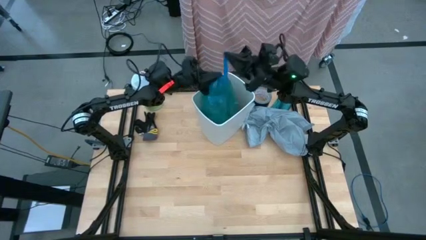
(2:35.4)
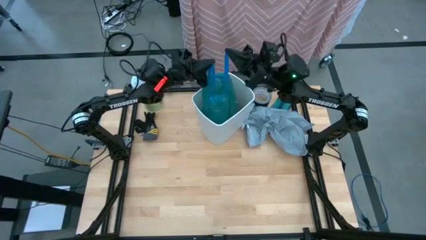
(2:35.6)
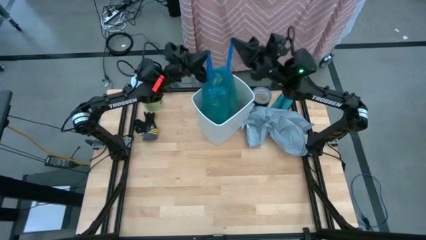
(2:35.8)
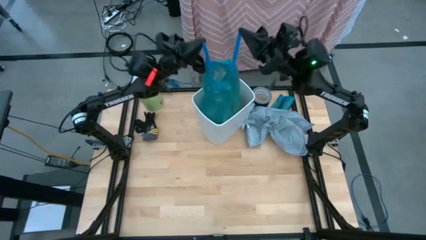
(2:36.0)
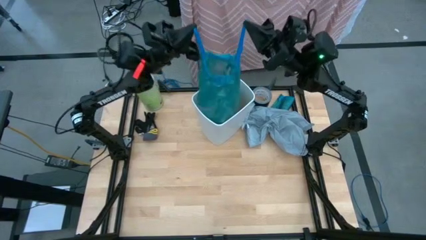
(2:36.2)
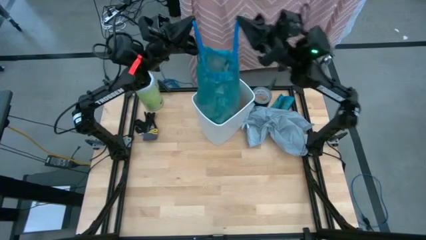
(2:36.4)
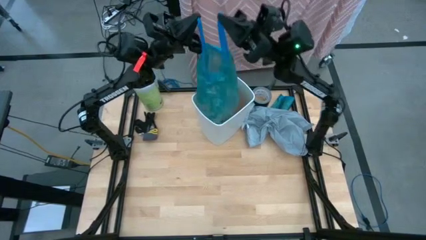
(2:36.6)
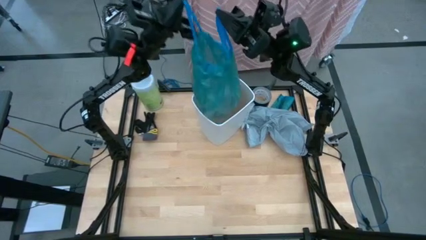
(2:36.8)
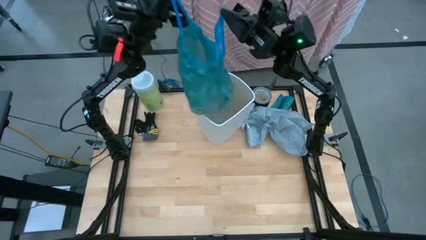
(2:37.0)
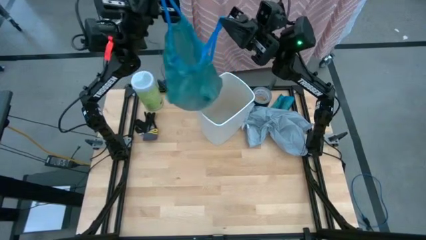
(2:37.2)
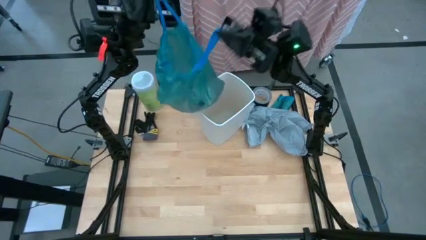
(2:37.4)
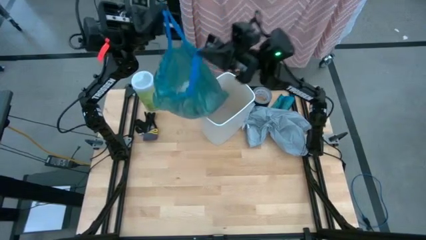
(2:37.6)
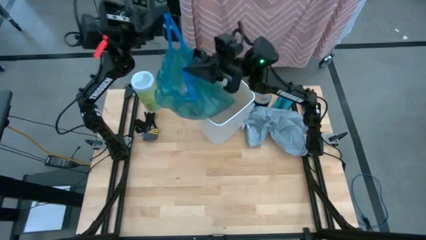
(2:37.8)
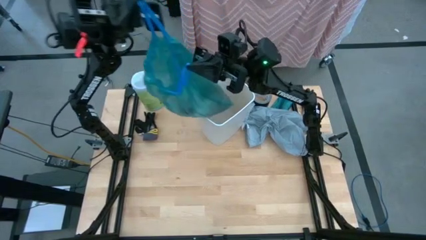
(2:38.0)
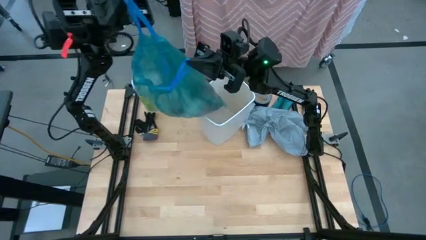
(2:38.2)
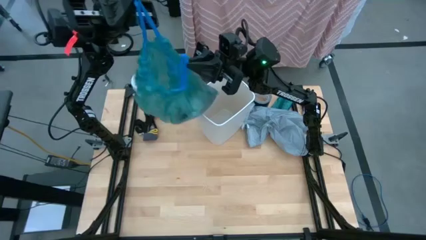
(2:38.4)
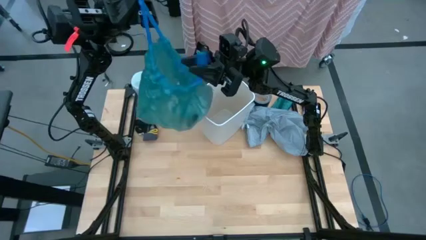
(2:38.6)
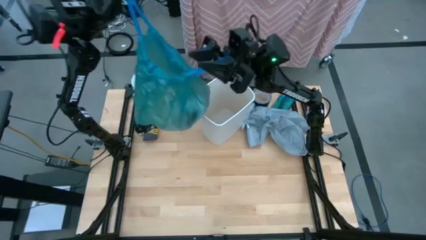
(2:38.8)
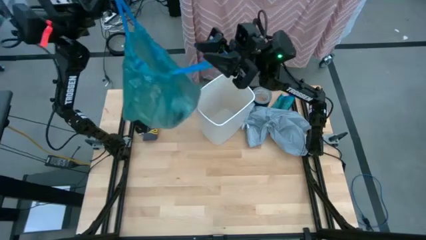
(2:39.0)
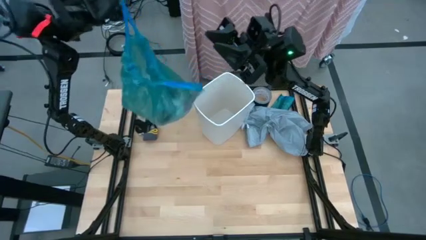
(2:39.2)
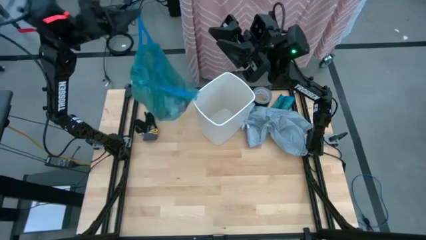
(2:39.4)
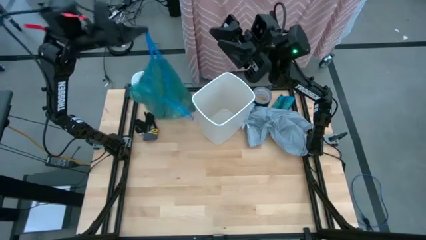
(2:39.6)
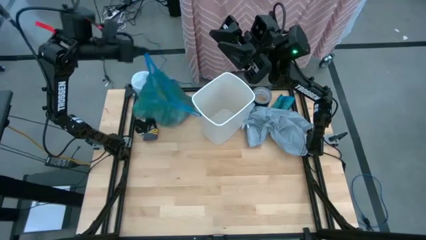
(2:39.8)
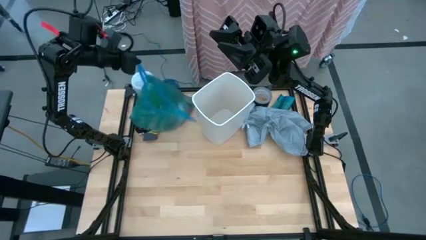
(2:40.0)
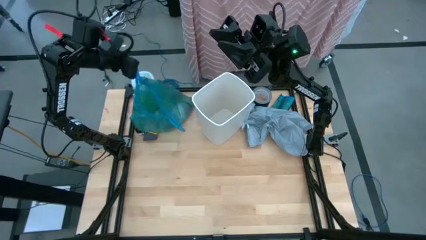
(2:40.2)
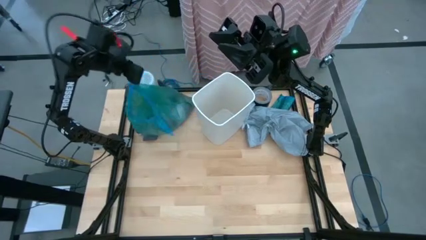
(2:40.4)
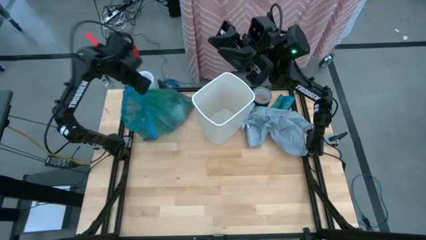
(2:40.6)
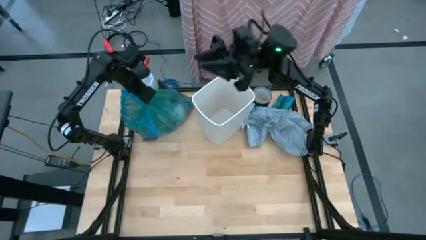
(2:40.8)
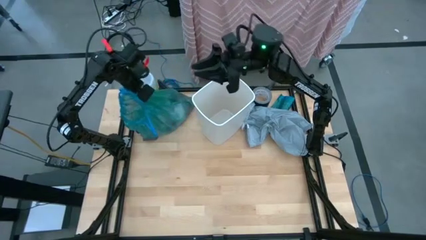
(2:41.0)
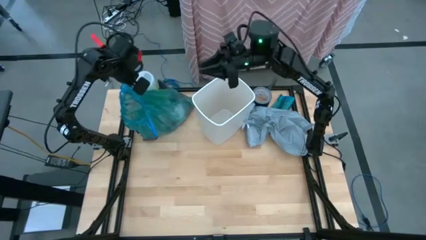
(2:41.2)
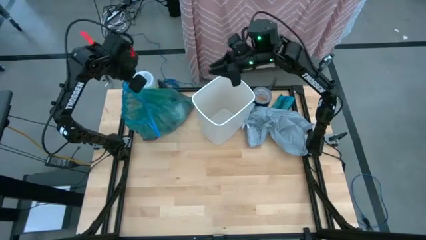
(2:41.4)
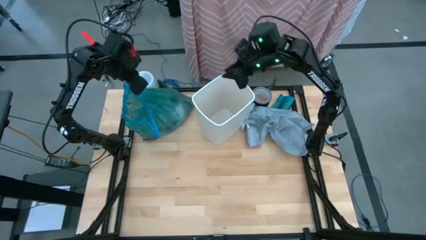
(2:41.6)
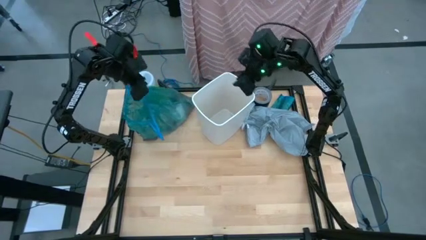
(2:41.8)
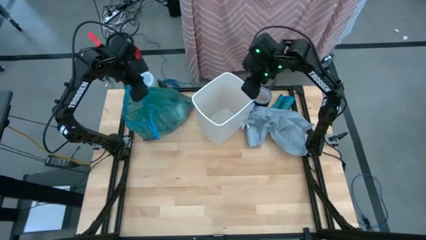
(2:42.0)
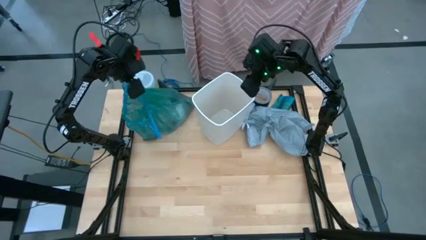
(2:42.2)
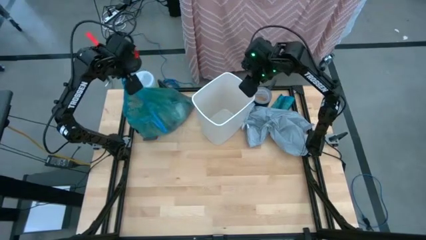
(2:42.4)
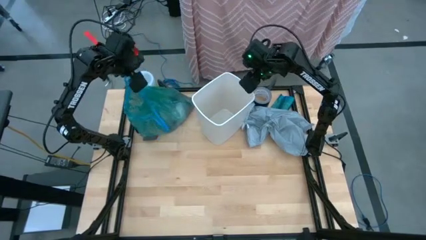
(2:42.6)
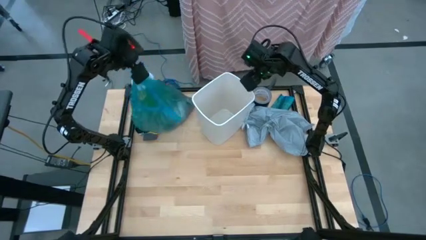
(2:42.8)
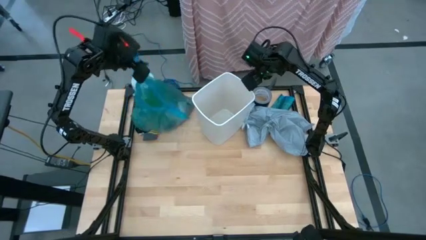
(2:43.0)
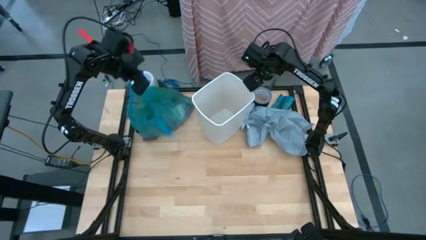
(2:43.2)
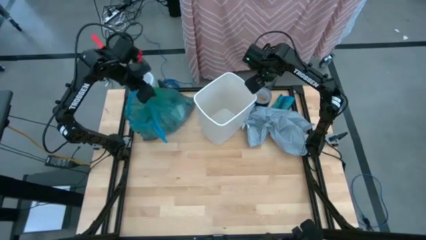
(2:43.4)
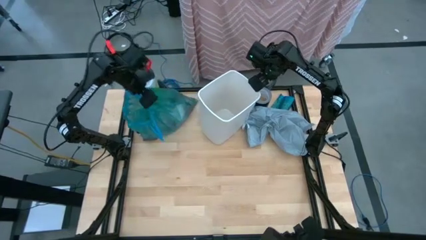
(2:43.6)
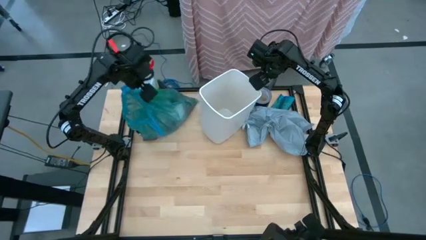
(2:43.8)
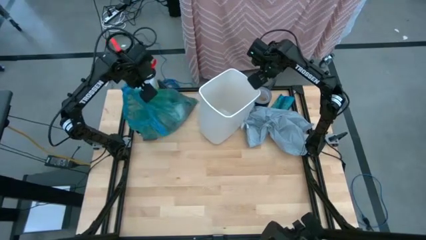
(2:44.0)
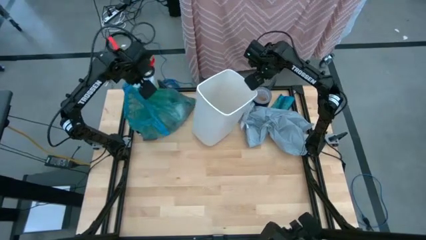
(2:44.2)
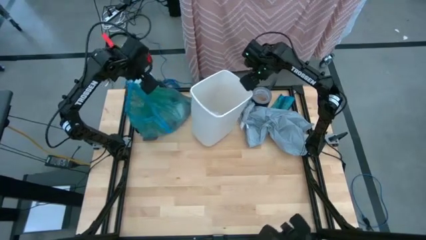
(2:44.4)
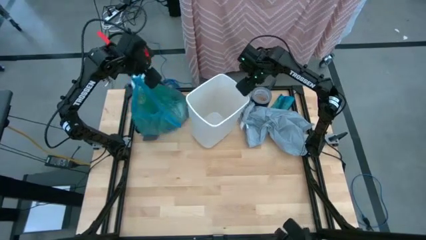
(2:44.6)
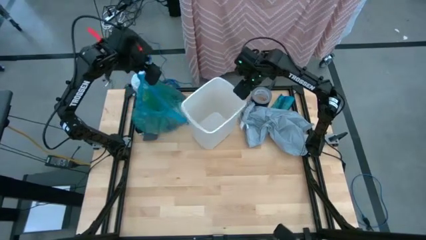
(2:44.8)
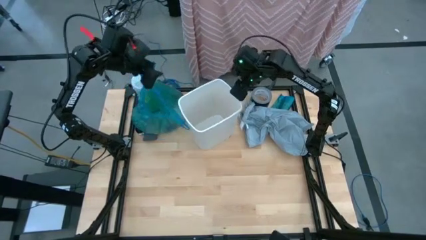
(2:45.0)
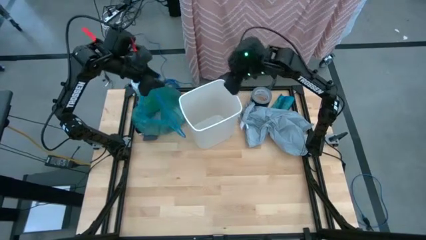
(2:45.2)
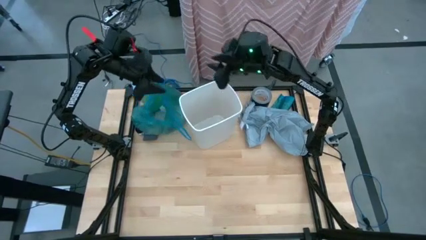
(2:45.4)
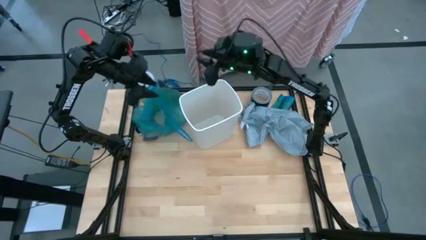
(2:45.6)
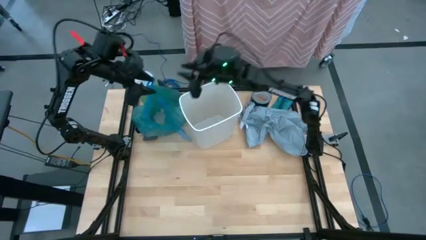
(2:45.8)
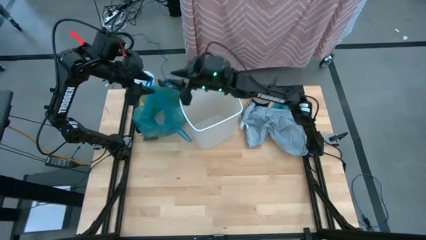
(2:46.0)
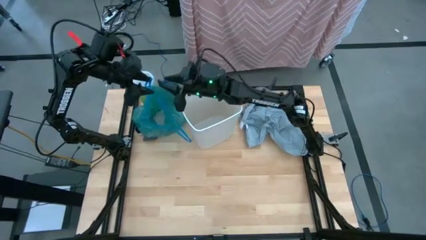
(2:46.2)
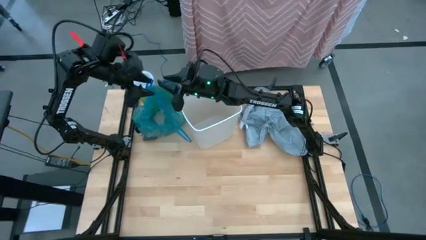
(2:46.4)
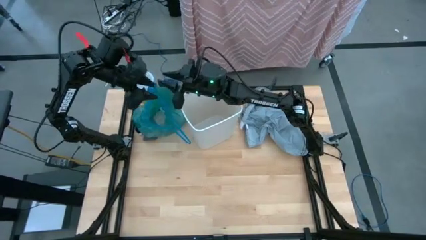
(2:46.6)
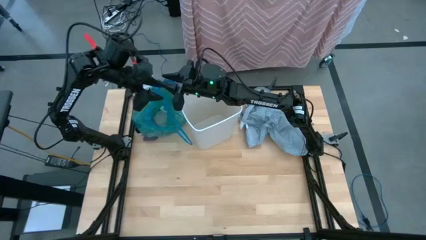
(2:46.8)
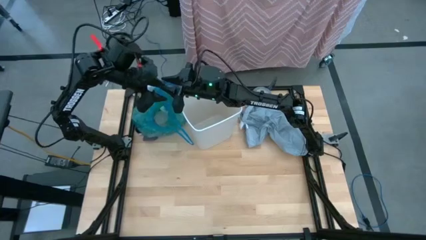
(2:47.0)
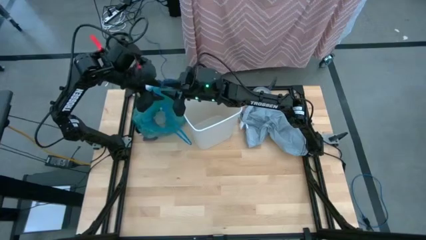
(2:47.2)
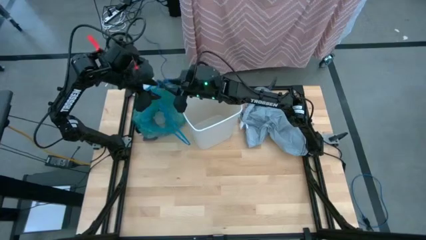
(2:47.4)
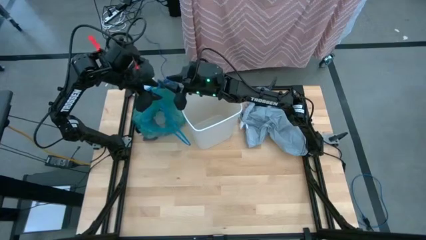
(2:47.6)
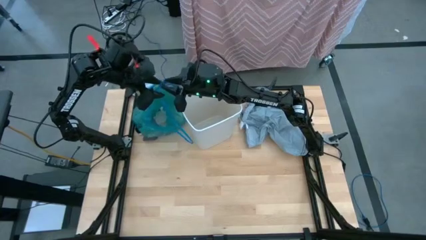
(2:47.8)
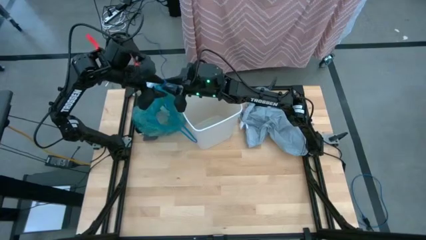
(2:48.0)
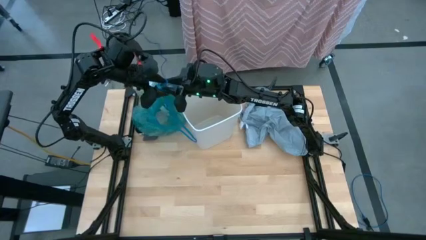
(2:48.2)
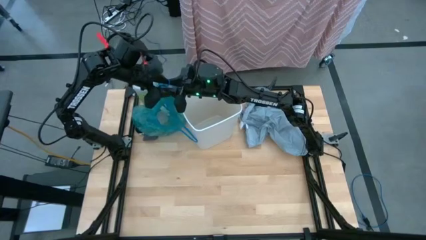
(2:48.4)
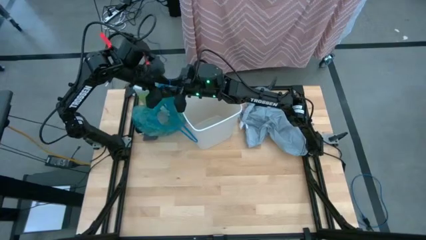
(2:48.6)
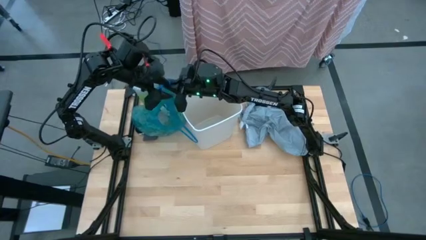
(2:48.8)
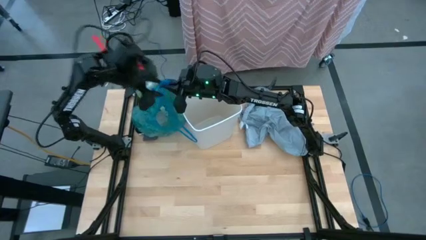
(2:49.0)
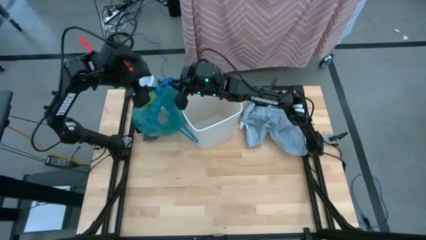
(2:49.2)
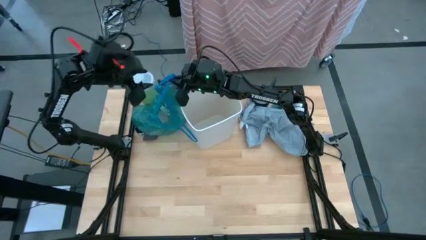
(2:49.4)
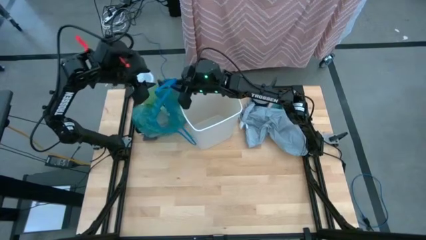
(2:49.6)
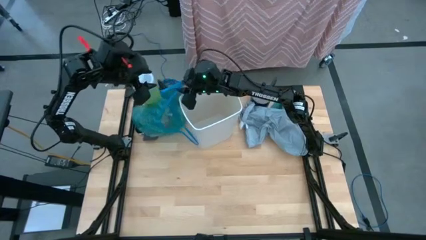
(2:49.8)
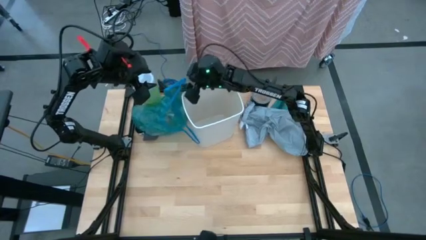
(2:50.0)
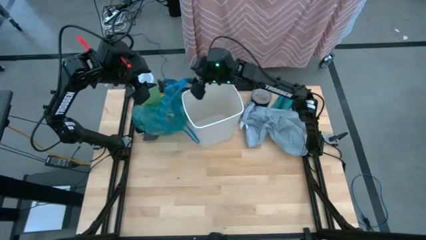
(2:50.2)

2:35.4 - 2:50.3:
Task: place trash/remove bag and relplace
Remove the trash bag from the trash bin

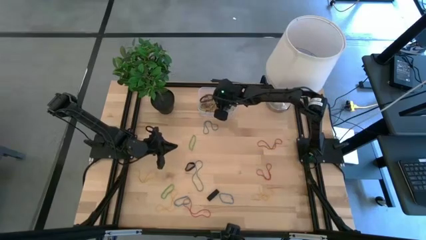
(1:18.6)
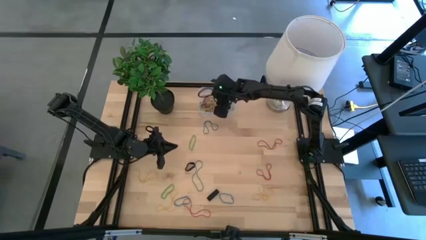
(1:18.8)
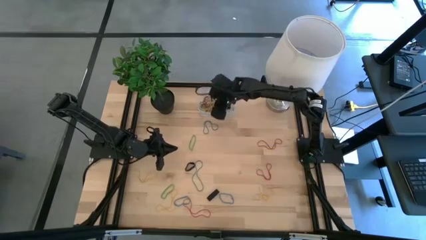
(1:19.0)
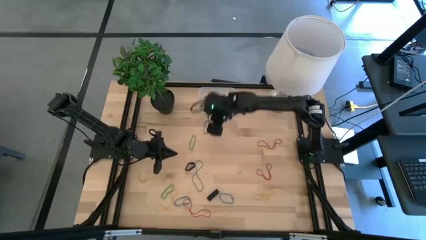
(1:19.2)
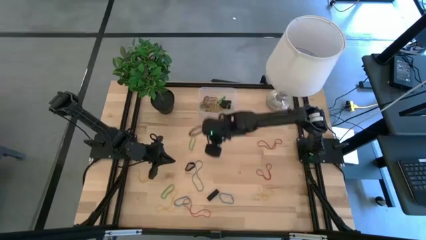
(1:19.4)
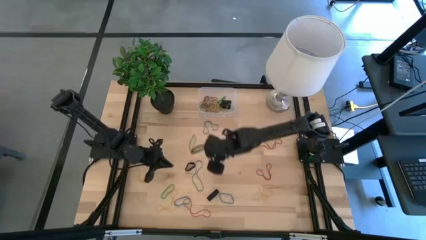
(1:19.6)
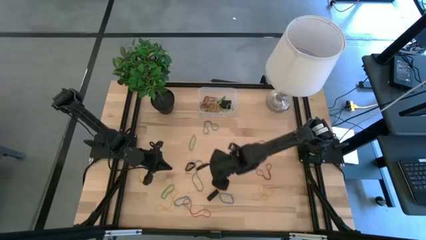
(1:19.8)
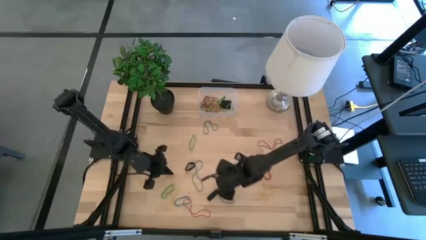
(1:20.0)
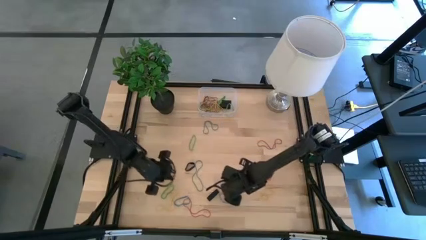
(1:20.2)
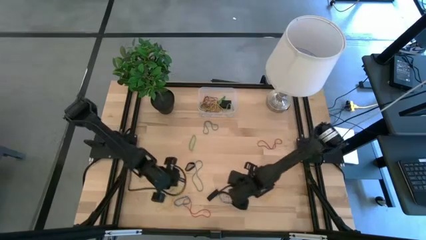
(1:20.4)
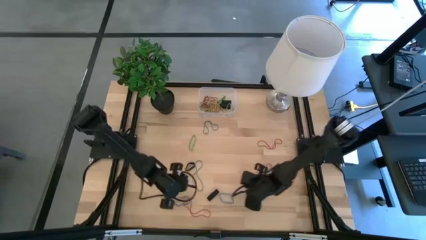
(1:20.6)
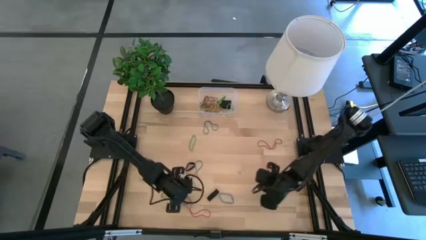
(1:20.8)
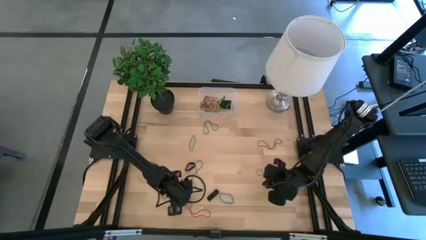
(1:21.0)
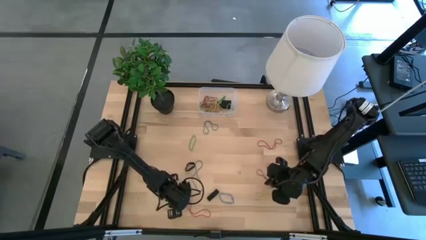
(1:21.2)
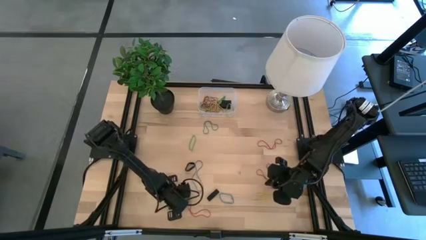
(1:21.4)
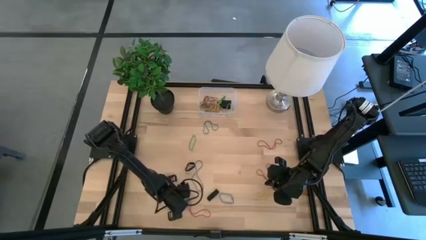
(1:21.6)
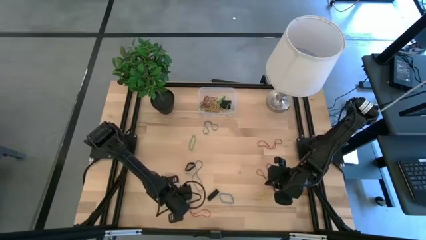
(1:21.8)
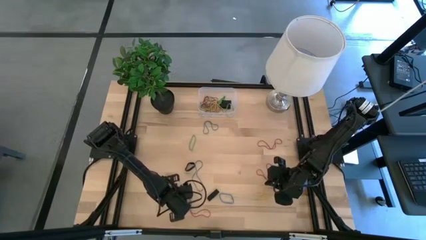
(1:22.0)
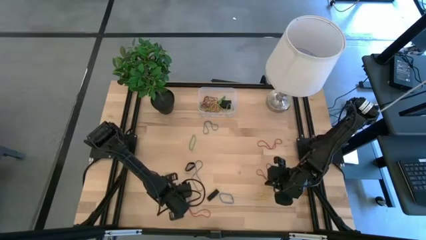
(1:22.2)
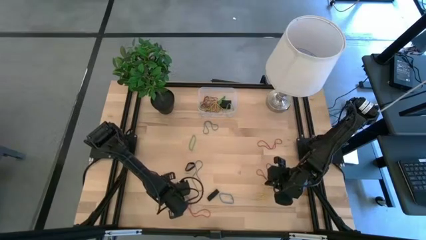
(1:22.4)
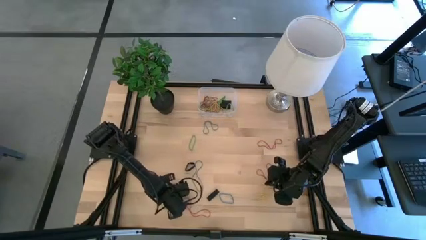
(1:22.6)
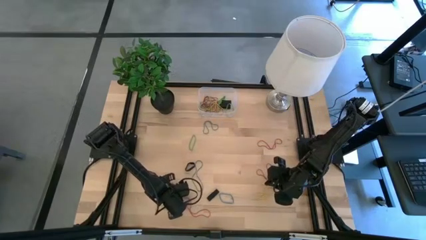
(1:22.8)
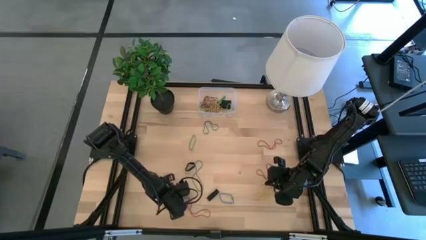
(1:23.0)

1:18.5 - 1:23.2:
Task: Pick and place rubber bands into bin
Put the blue rubber band into the transparent bin
